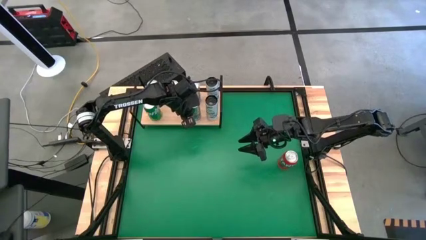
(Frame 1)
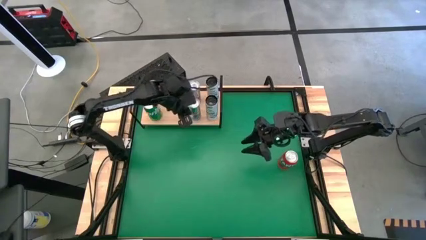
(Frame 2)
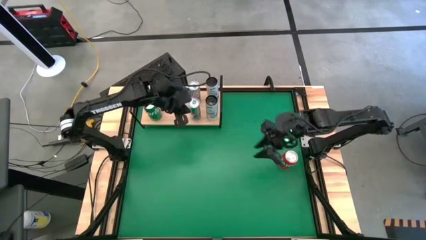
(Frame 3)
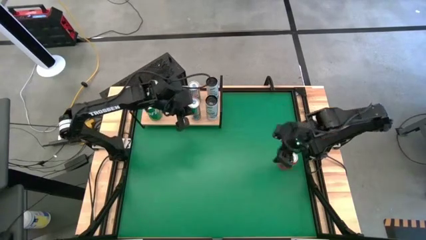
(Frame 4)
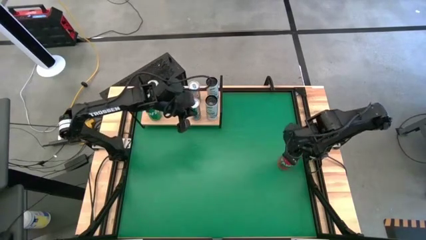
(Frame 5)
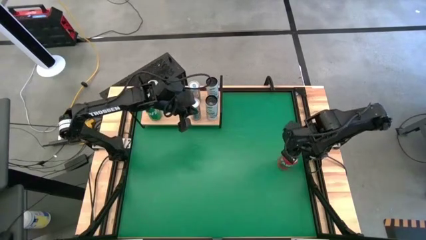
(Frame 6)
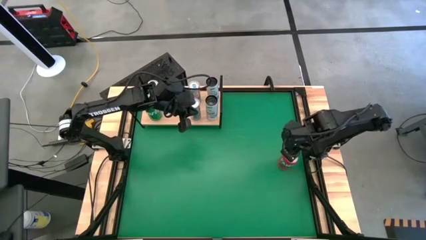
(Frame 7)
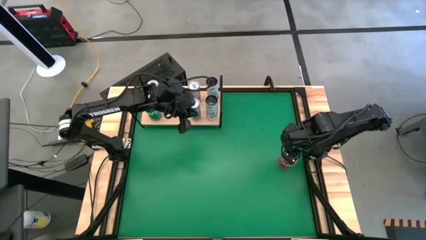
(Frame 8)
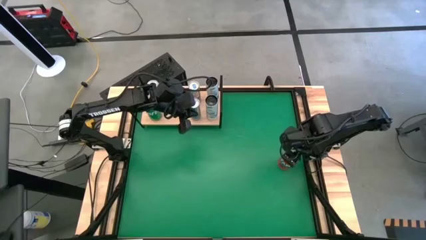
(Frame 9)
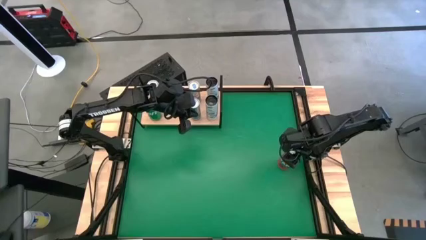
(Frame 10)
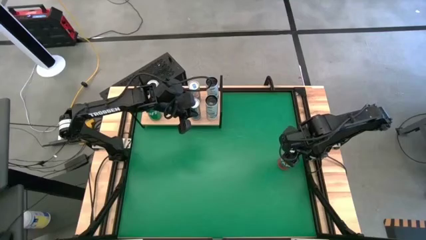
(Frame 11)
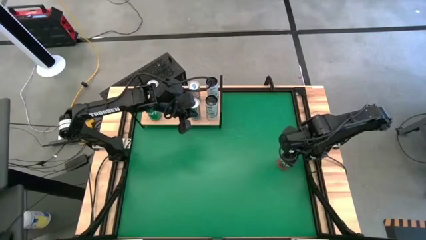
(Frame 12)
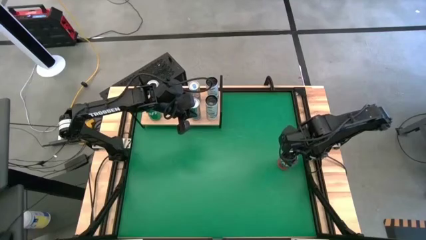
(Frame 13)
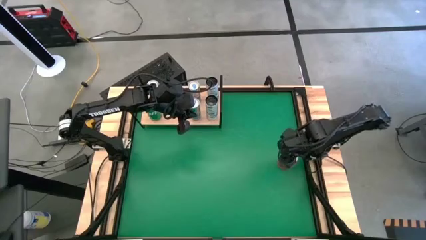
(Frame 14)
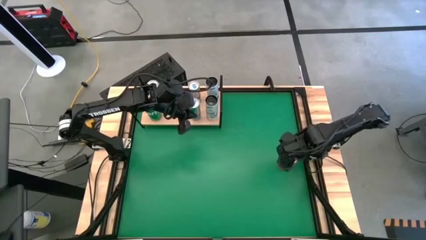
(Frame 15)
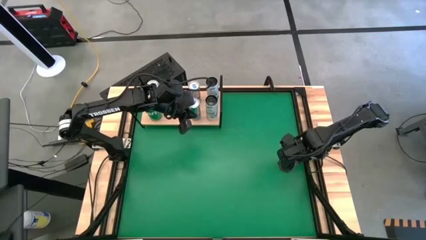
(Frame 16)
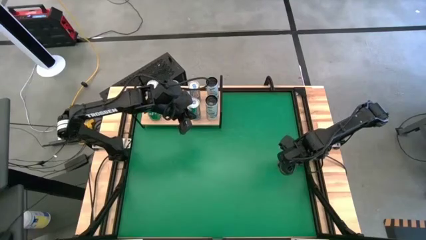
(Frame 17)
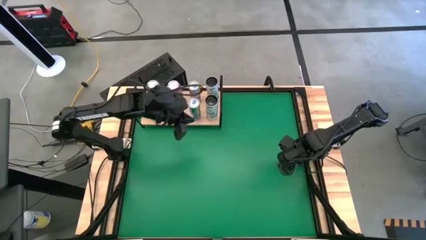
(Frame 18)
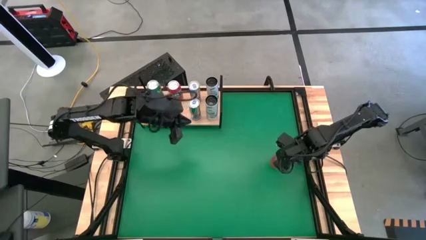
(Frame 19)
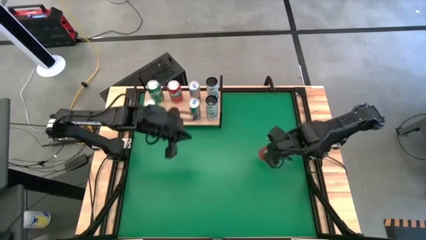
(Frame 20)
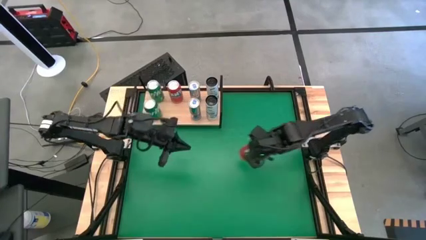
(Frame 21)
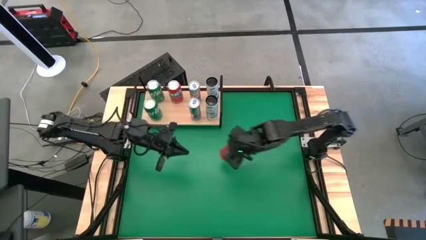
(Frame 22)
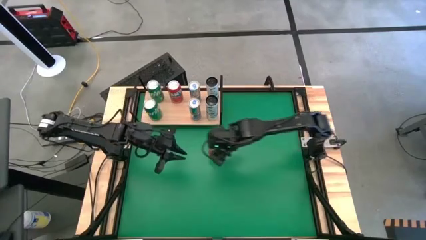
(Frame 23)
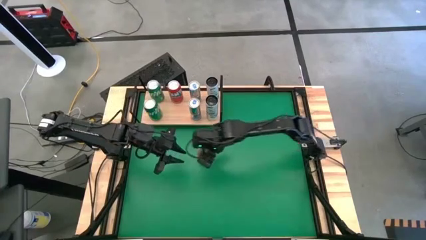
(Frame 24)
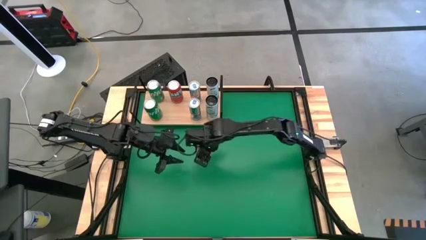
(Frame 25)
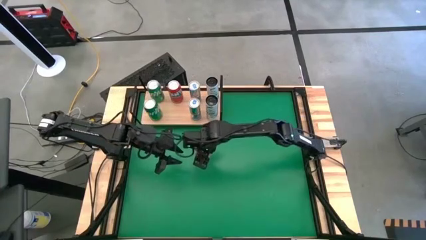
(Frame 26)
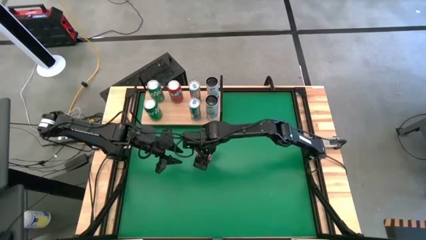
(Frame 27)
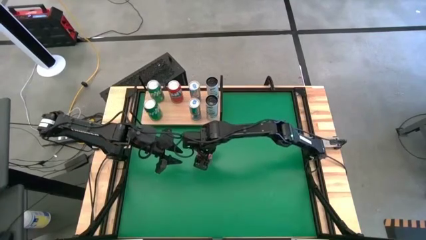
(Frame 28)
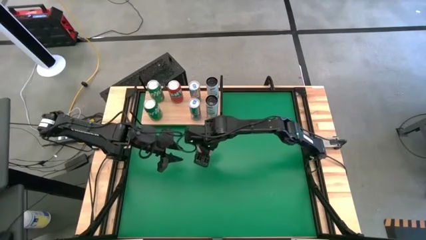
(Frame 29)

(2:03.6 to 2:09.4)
Task: Place canned beverage on shelf
Put the orange soda can on the shelf aligned with the orange soda can

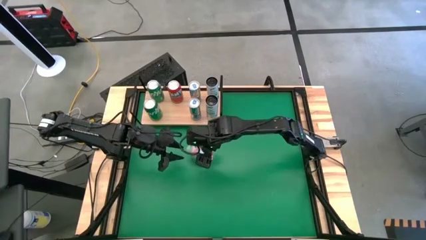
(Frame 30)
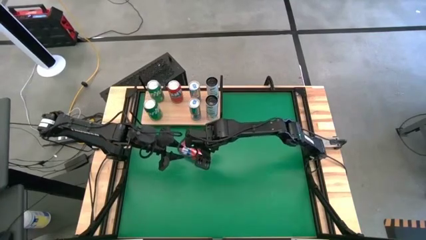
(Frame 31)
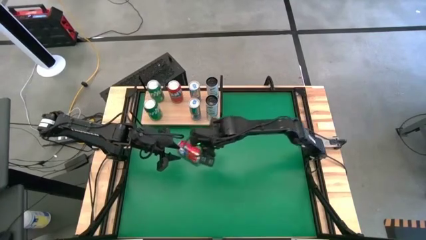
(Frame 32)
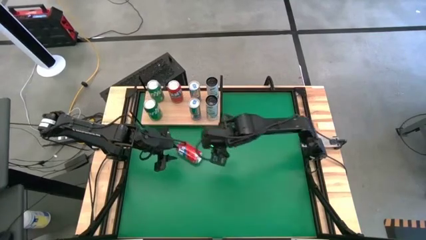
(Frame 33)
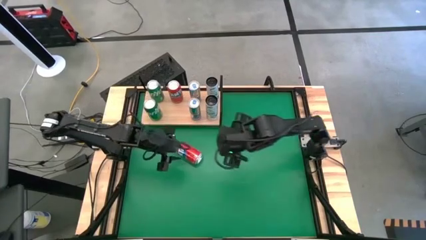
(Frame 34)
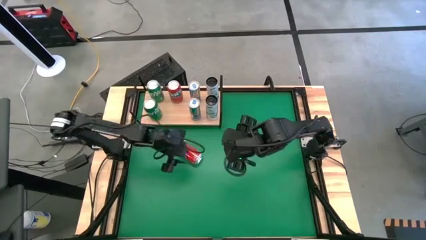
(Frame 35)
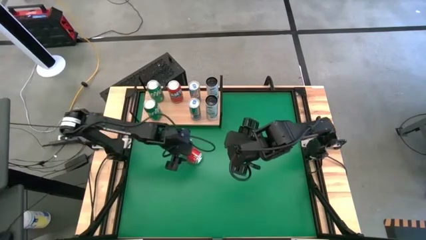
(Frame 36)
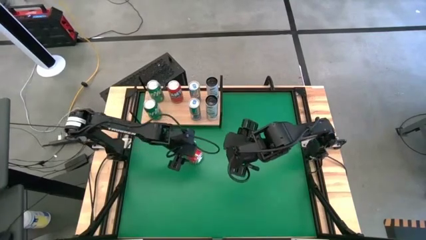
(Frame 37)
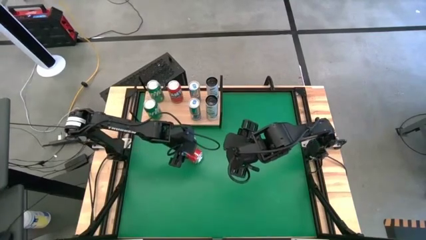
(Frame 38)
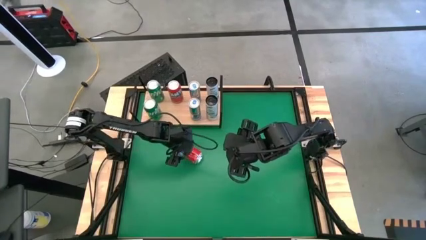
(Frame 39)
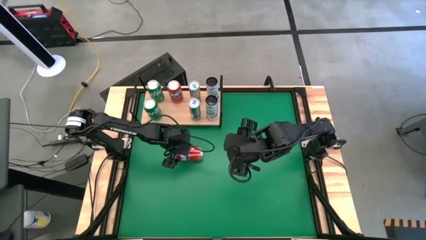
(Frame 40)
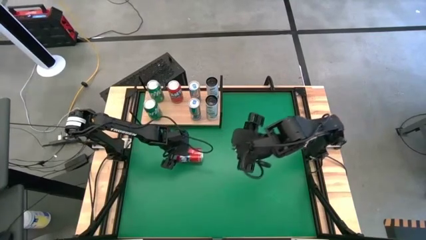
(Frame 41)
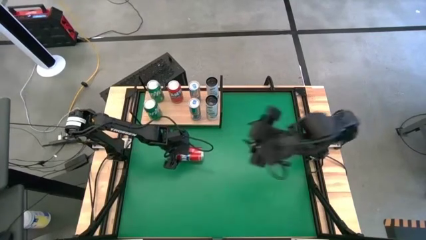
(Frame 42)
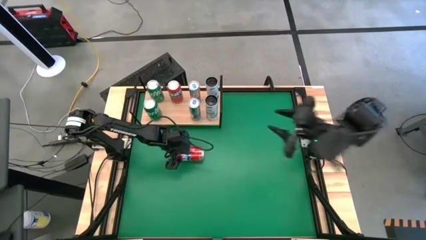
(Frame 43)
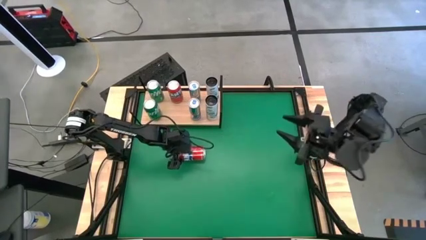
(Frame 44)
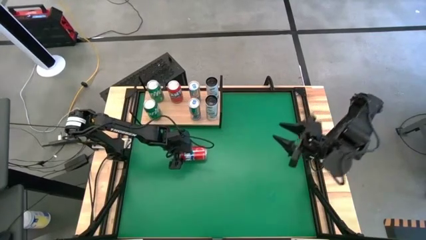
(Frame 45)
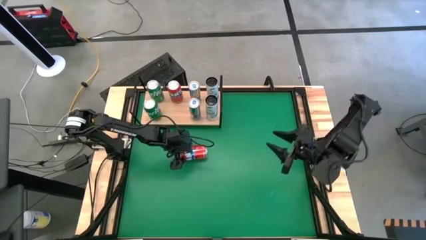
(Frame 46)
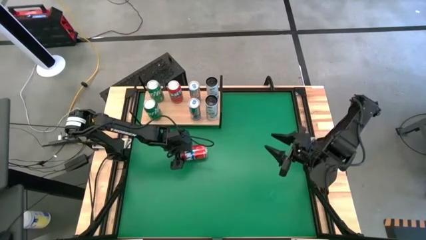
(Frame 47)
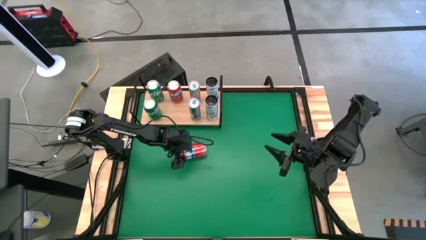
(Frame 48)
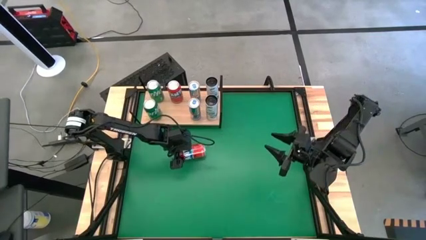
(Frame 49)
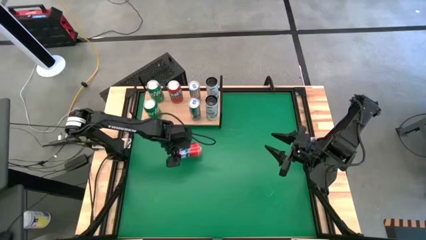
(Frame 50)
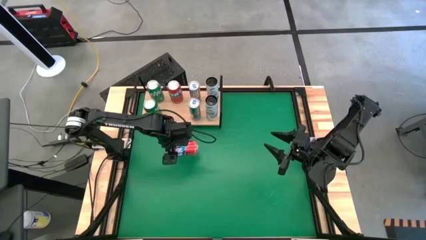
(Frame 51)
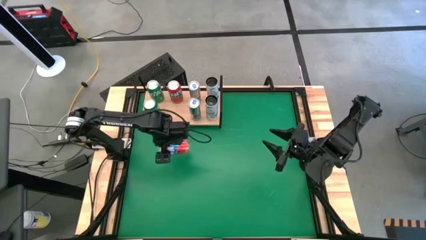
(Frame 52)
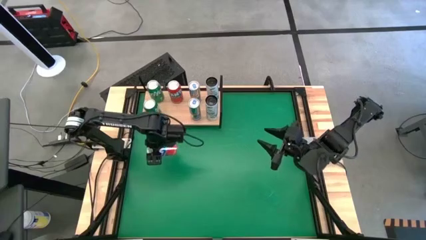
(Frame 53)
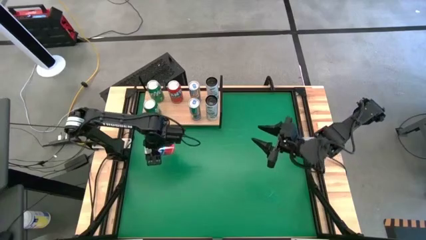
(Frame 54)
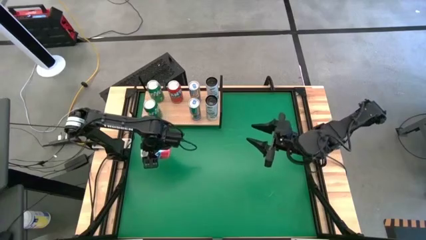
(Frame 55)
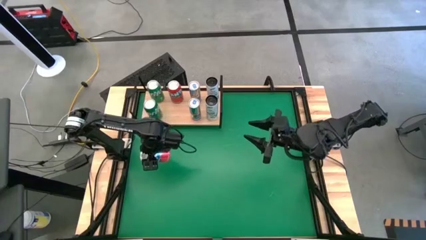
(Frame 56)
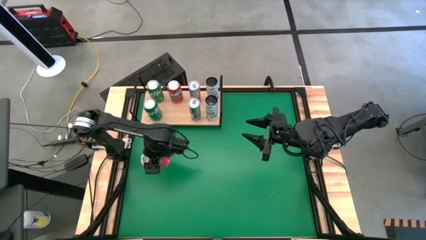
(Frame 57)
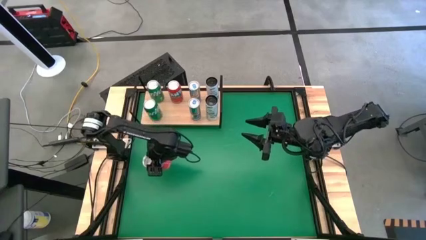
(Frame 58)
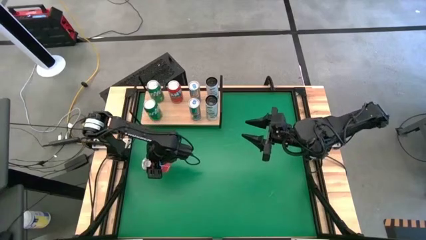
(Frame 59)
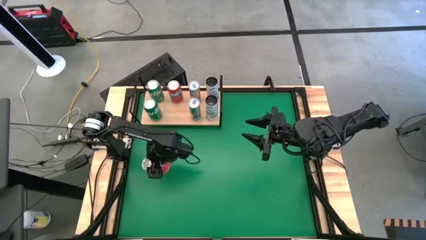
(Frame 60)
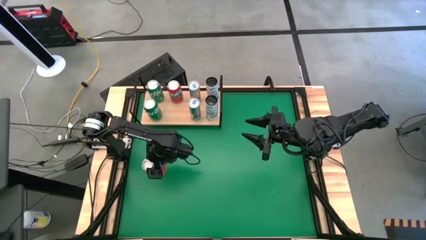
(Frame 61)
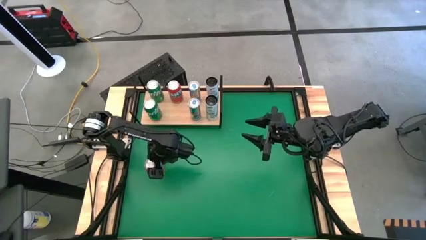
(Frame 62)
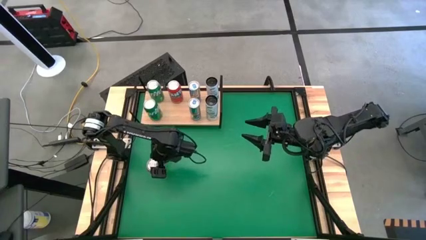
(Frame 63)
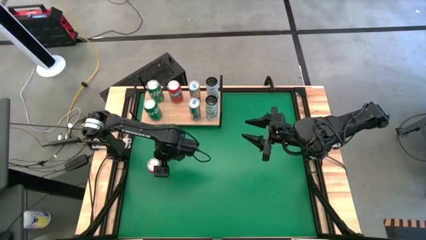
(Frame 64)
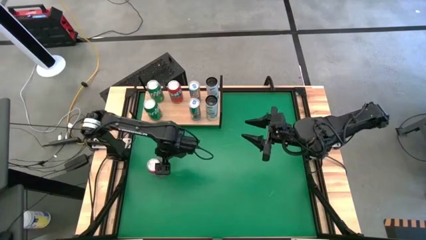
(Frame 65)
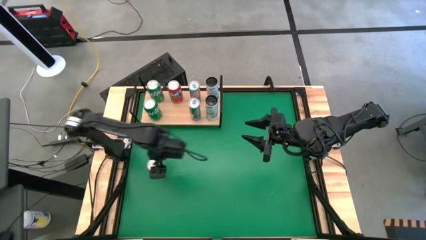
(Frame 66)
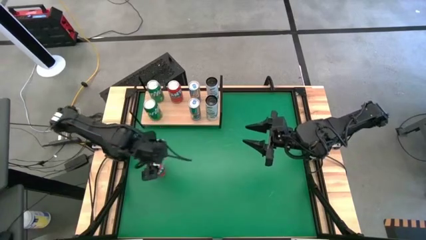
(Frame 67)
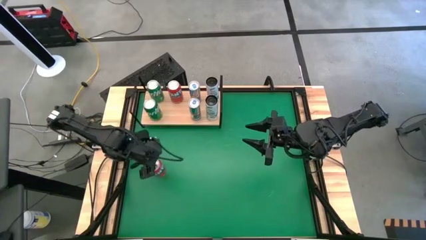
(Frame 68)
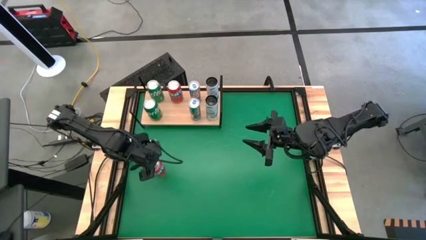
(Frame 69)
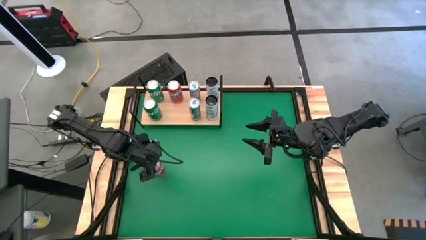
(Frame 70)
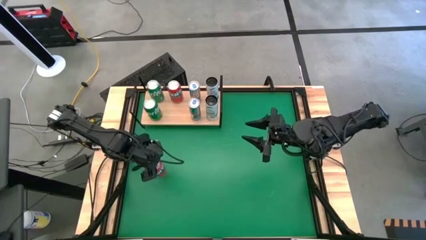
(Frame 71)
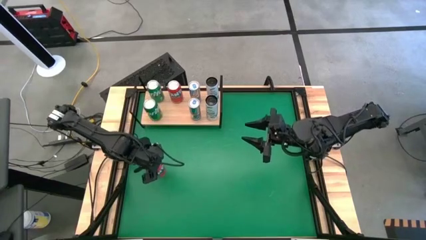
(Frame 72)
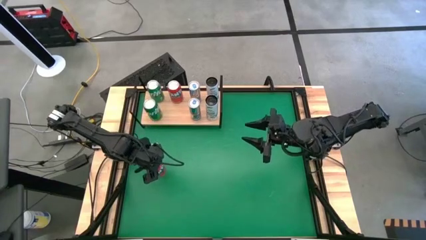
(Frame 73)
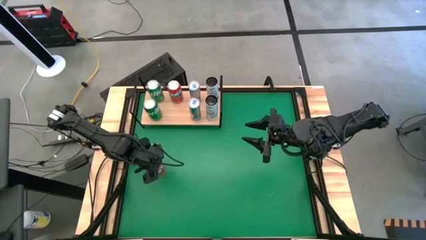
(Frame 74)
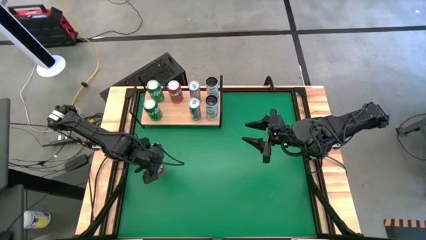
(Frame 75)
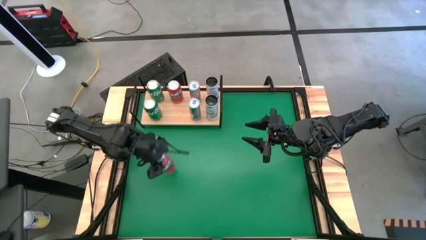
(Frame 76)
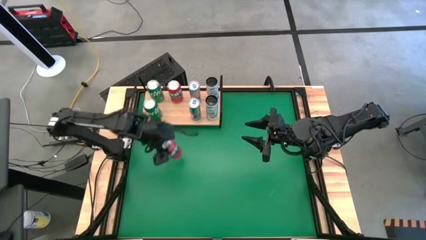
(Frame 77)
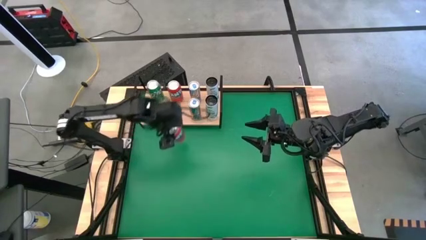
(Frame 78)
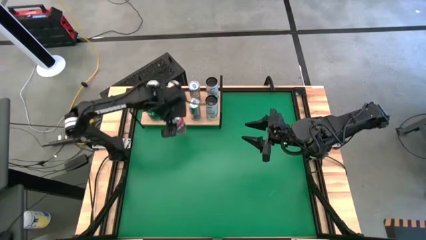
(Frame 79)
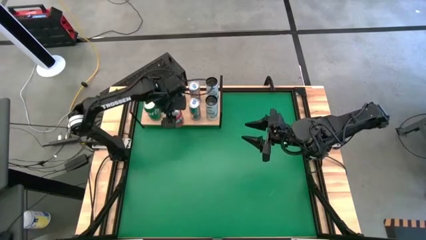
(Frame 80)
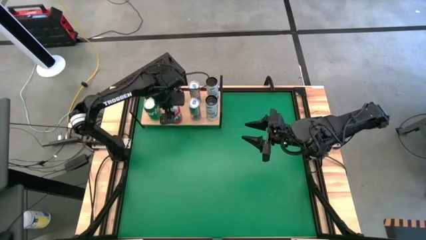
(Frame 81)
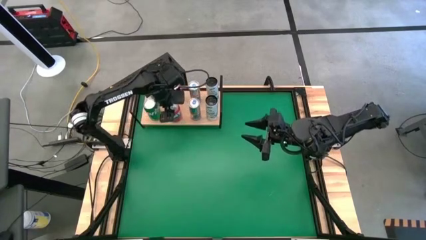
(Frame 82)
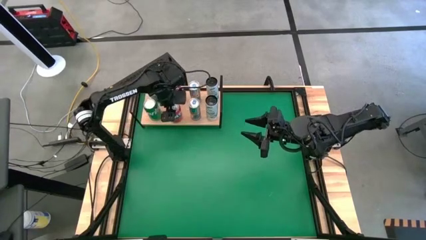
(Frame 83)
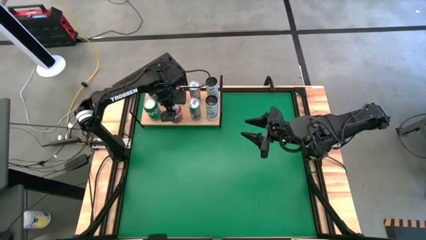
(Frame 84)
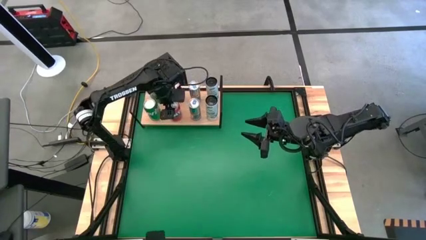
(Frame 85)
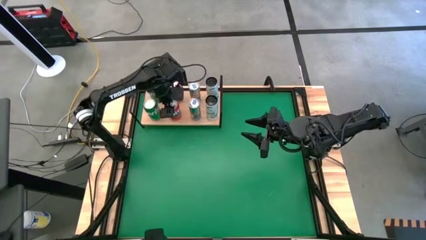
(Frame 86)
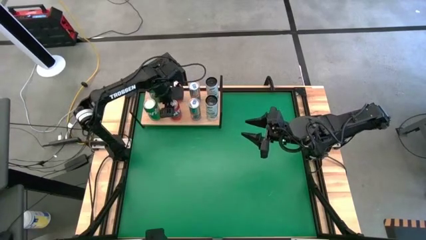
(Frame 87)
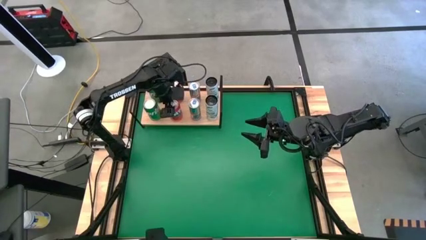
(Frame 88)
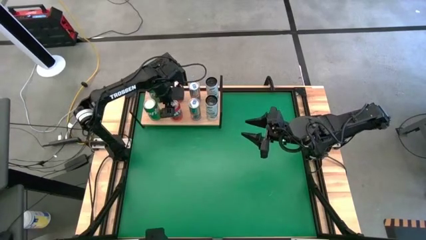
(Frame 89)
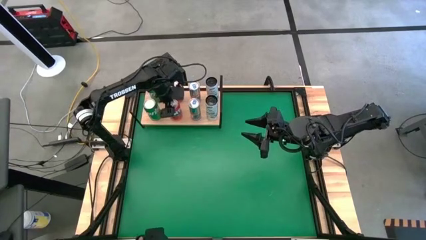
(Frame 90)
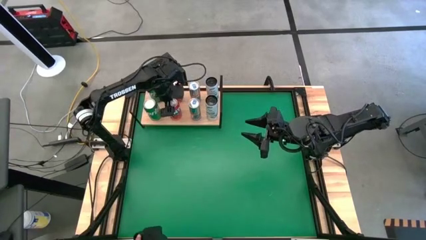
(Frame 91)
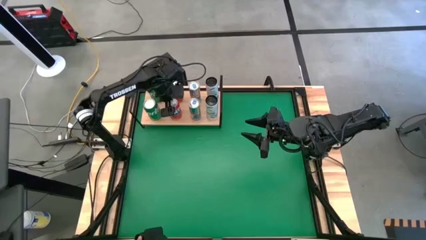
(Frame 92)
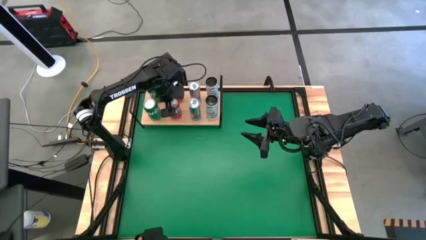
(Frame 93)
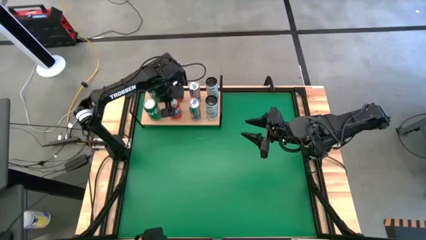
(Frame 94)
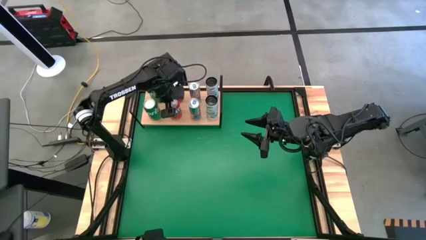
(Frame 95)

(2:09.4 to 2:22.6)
Put the orange soda can on the shelf aligned with the other orange soda can
